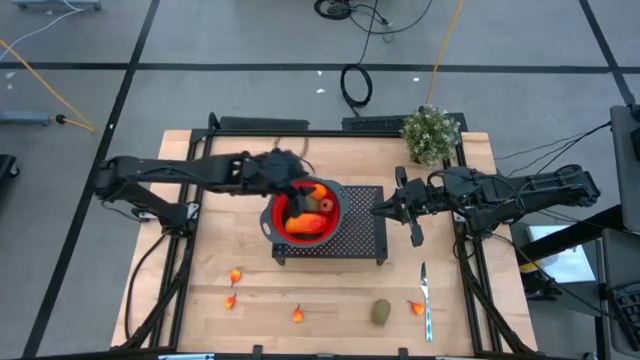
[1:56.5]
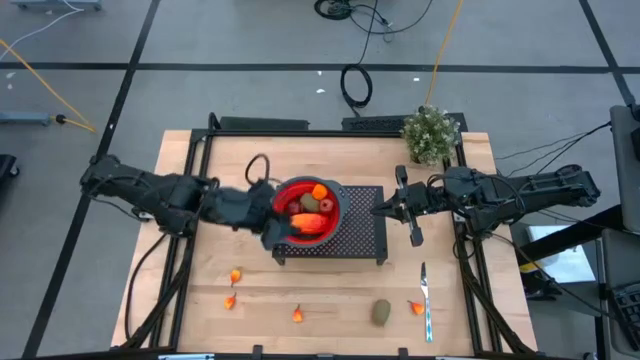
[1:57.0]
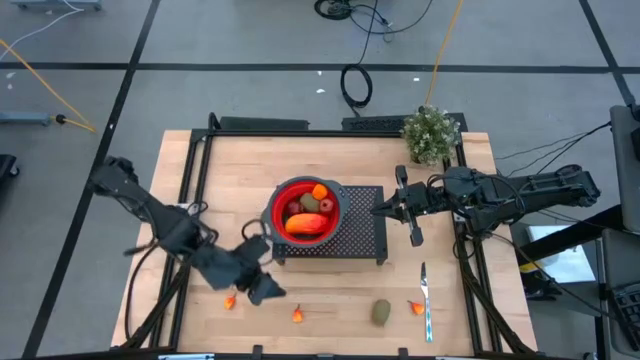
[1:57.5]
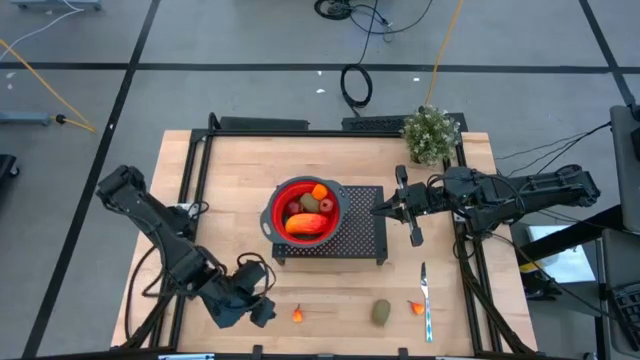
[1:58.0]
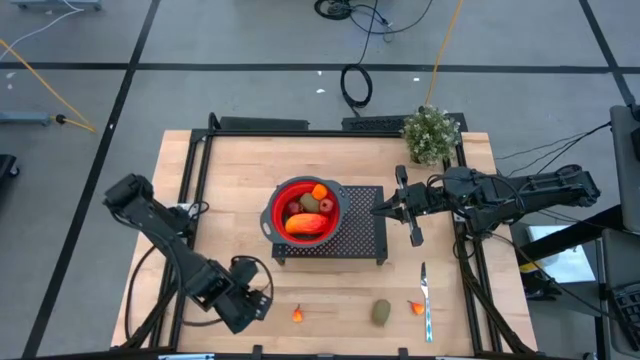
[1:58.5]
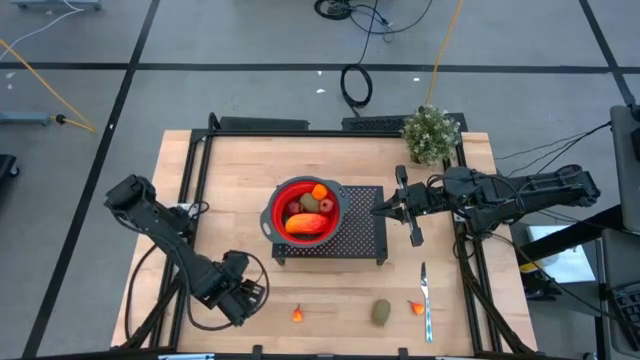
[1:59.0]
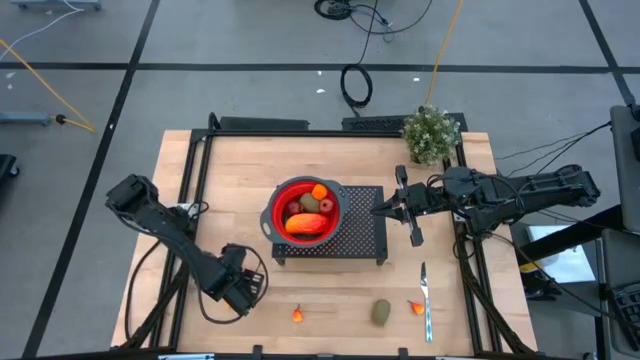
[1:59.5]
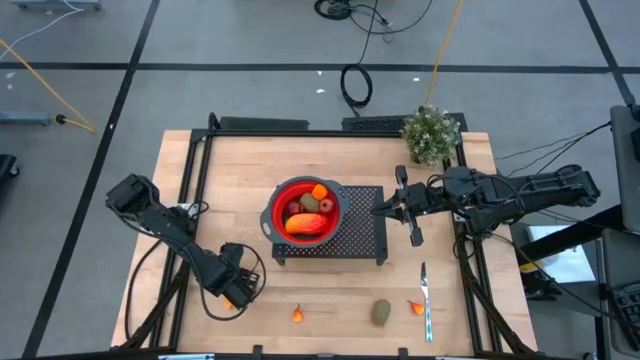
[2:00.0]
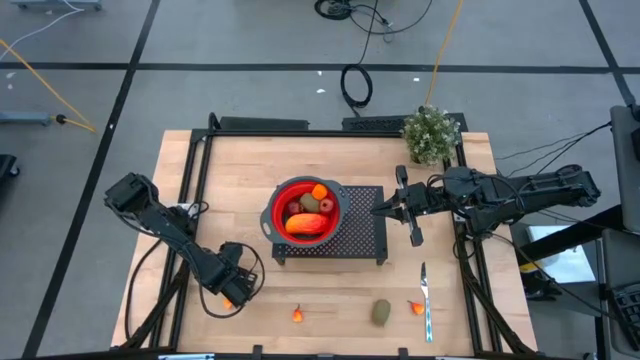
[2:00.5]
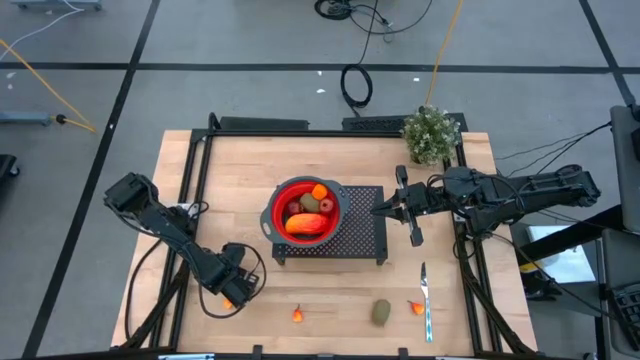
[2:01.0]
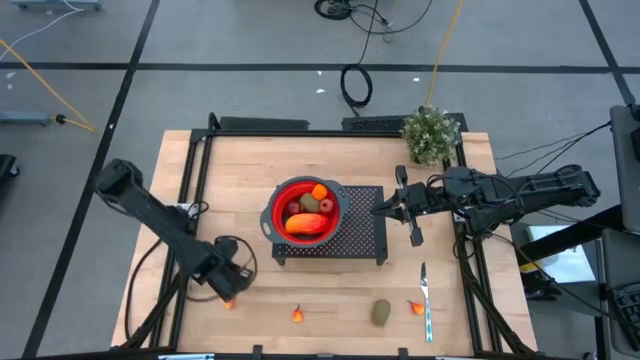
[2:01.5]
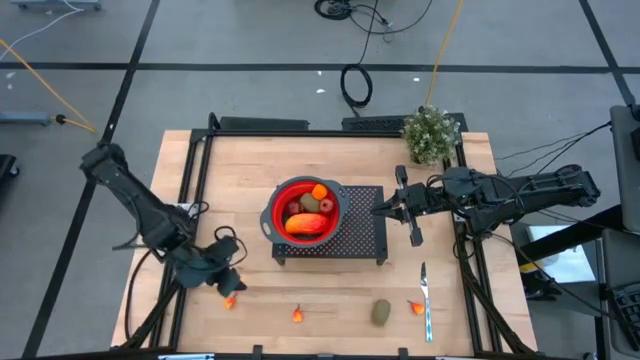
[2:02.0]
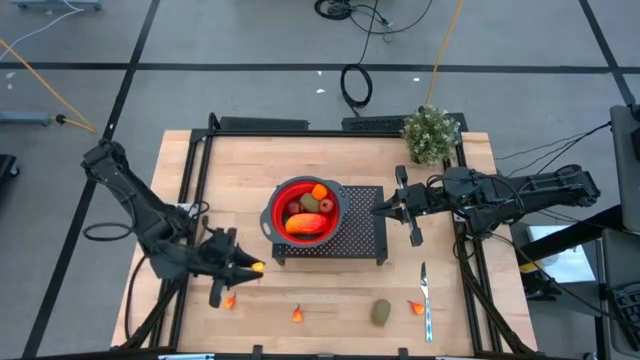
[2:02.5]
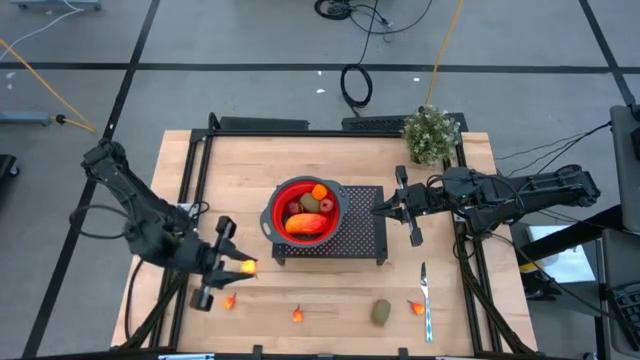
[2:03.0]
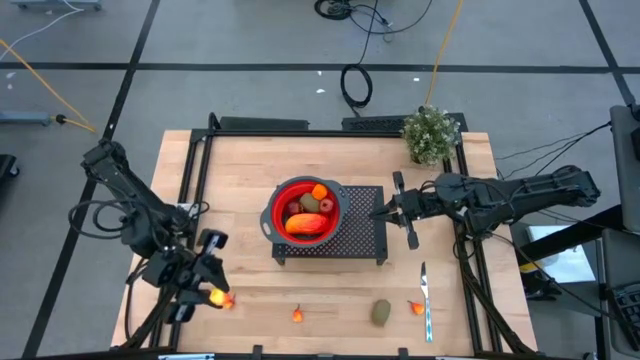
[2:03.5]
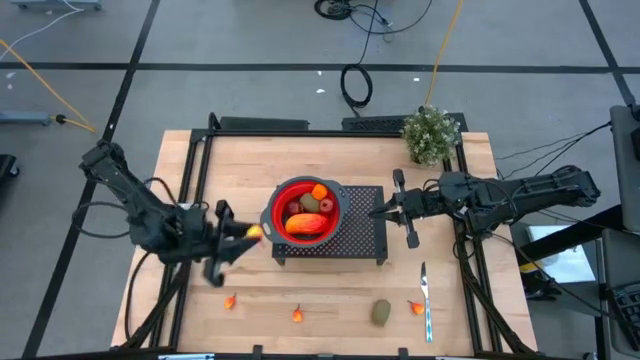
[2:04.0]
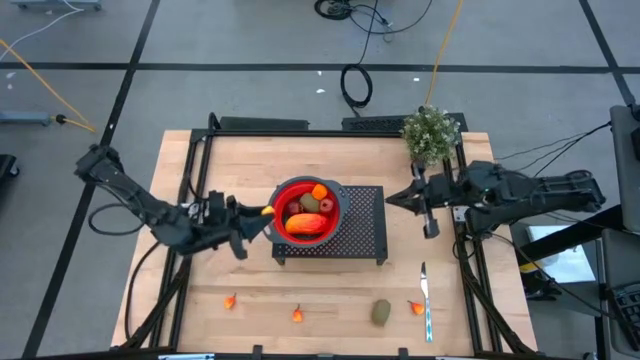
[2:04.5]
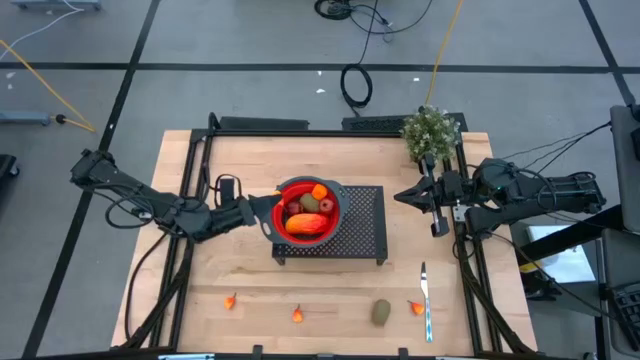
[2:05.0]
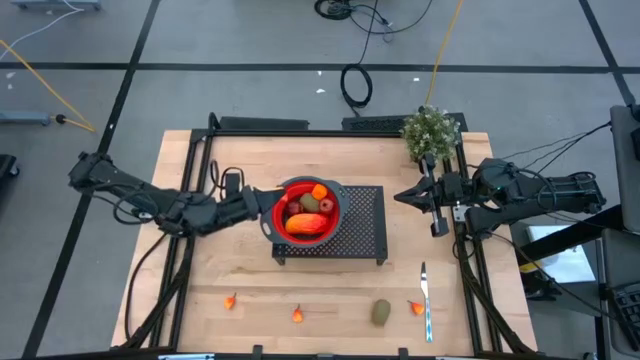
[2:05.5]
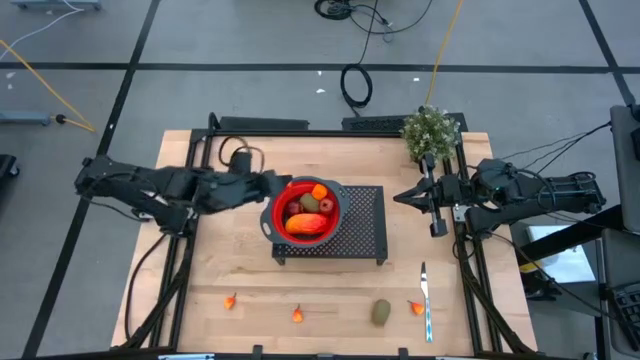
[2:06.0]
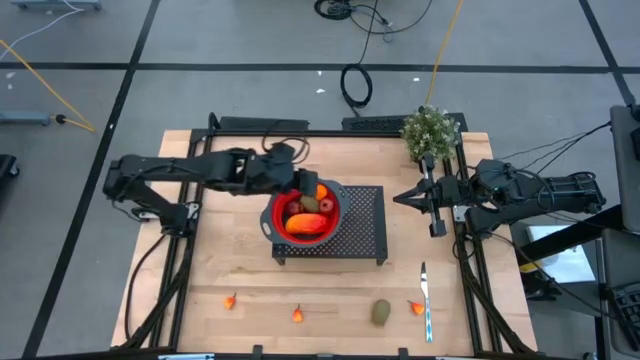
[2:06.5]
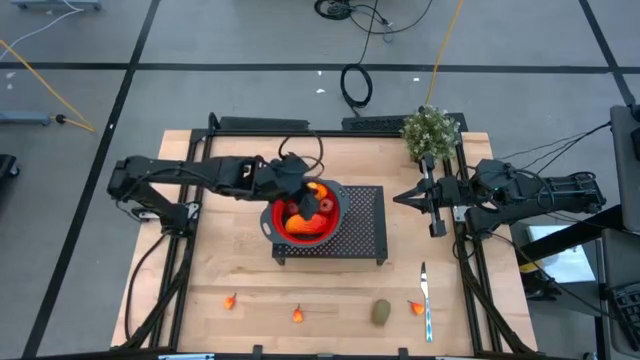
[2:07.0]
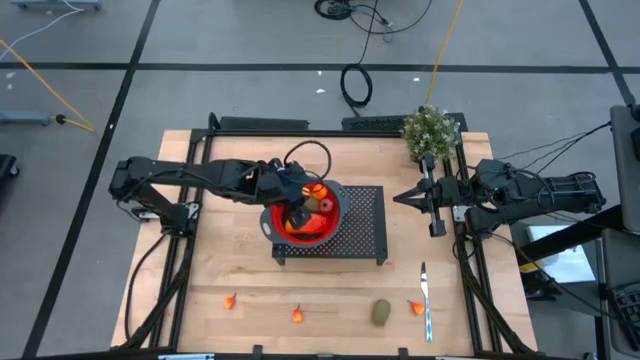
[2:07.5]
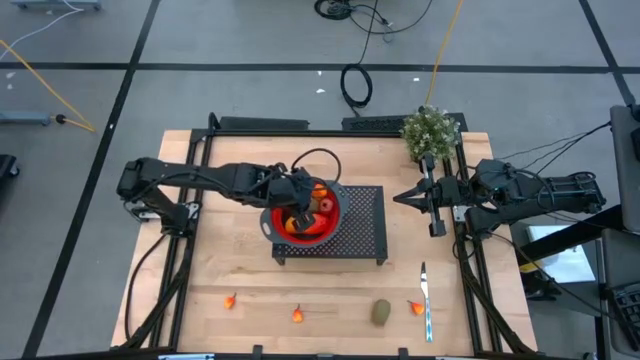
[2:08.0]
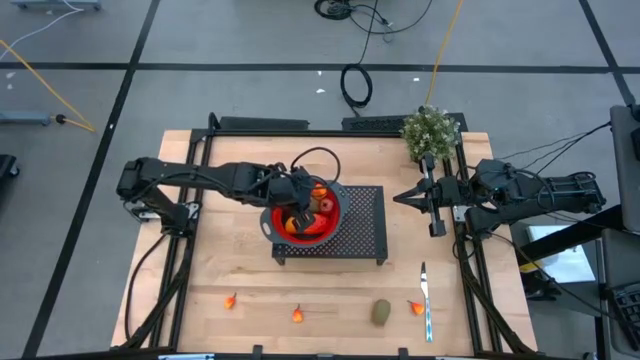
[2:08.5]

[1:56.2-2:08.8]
Task: Pick & Place Fruit
Put the orange pear into the red strainer bowl on the shelf

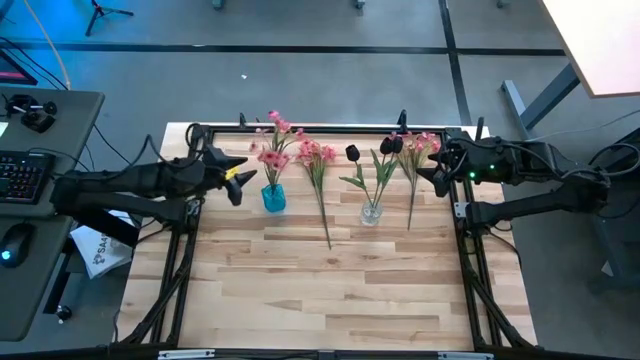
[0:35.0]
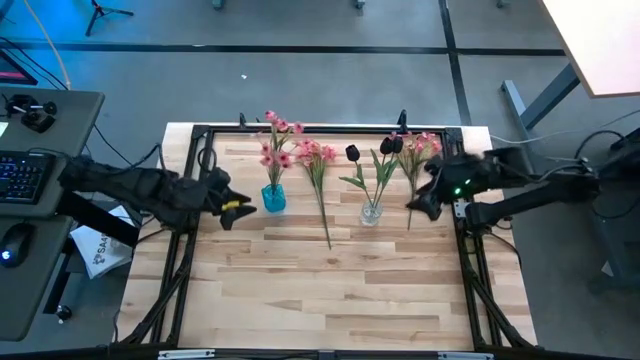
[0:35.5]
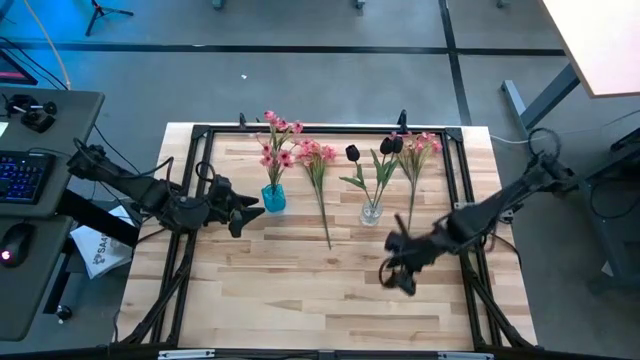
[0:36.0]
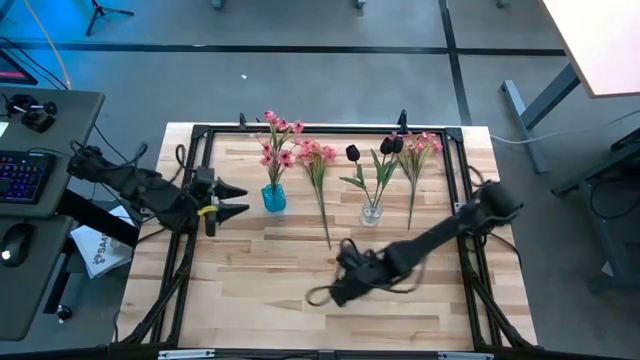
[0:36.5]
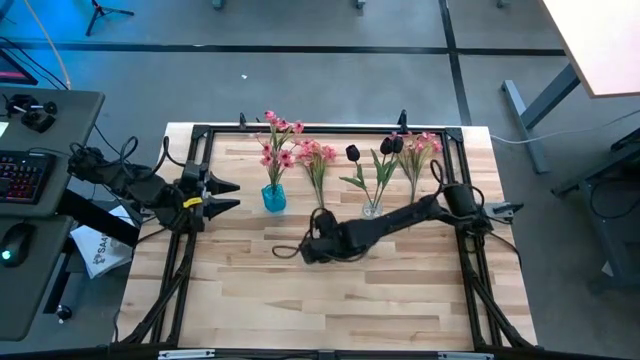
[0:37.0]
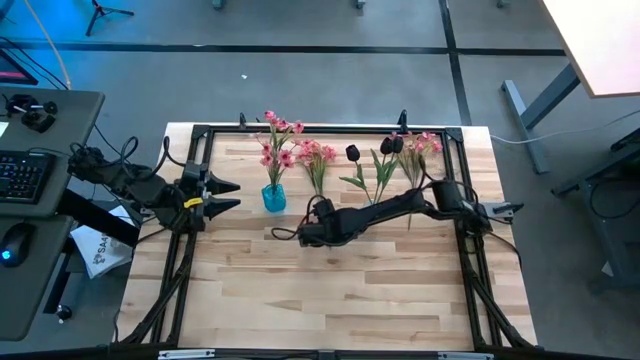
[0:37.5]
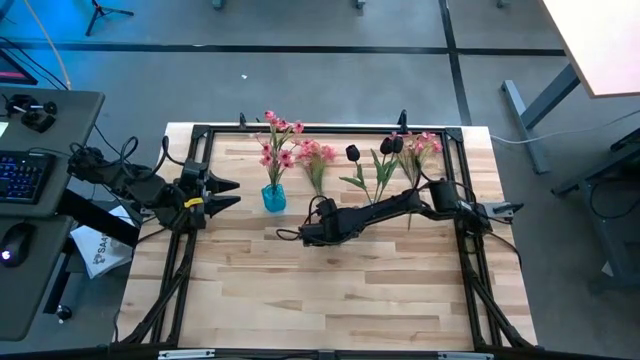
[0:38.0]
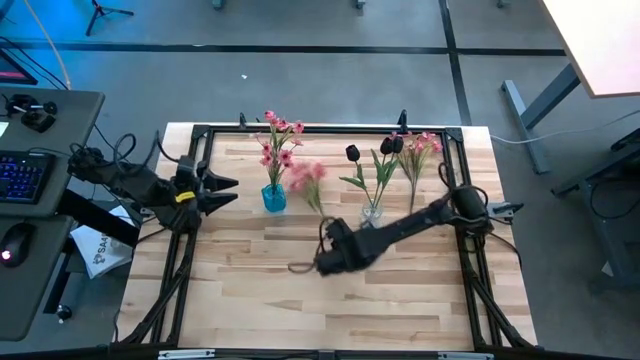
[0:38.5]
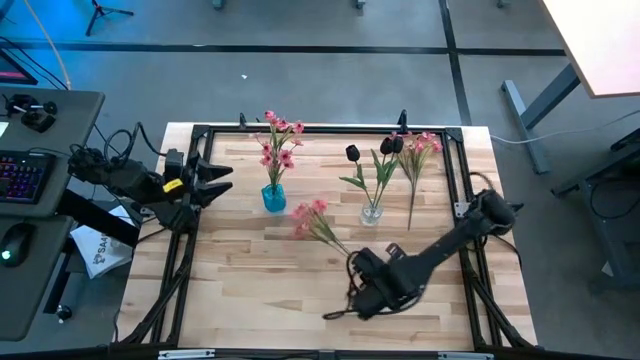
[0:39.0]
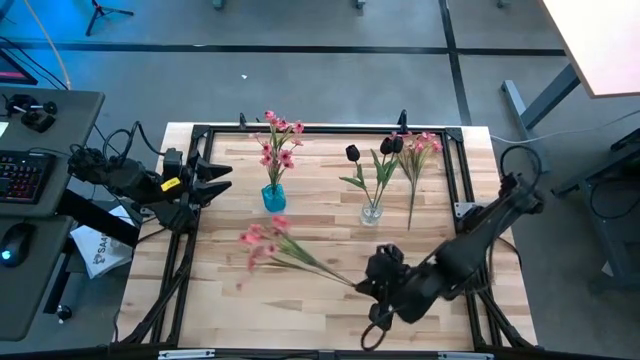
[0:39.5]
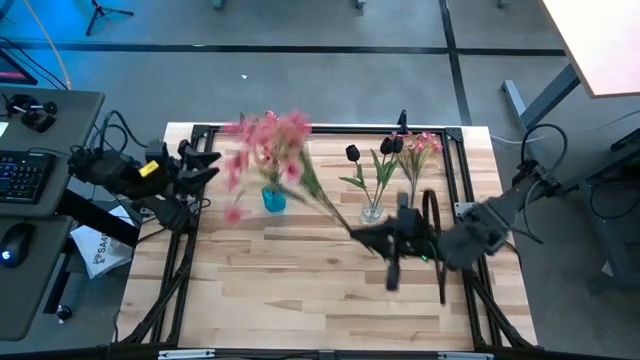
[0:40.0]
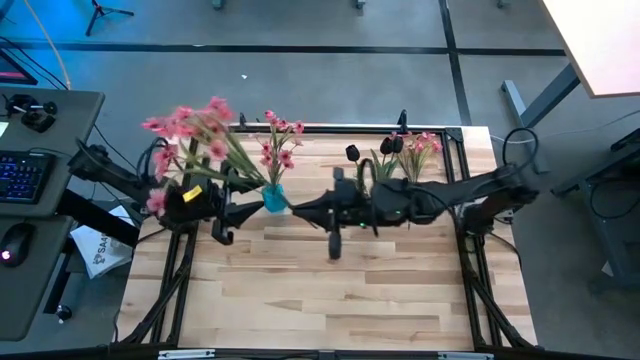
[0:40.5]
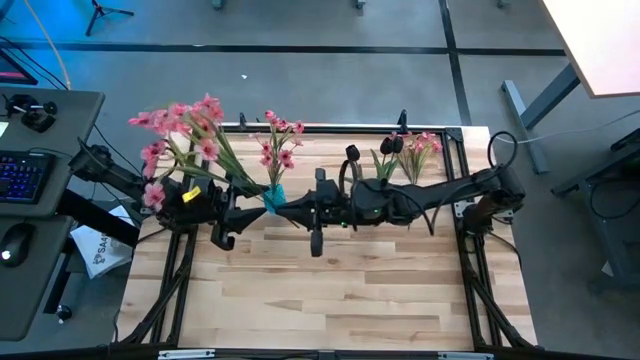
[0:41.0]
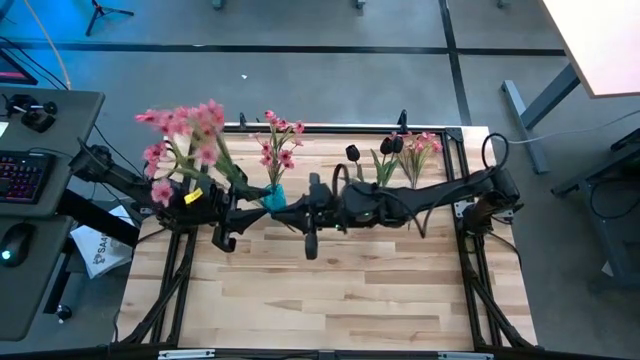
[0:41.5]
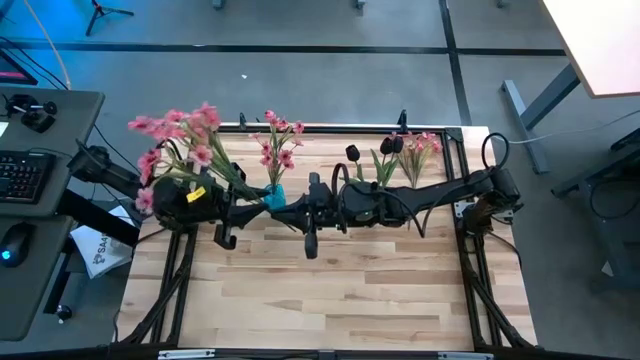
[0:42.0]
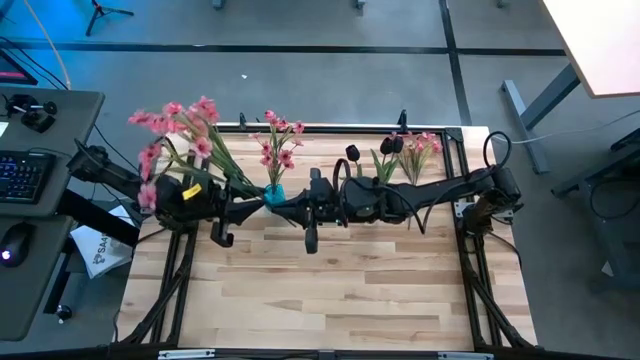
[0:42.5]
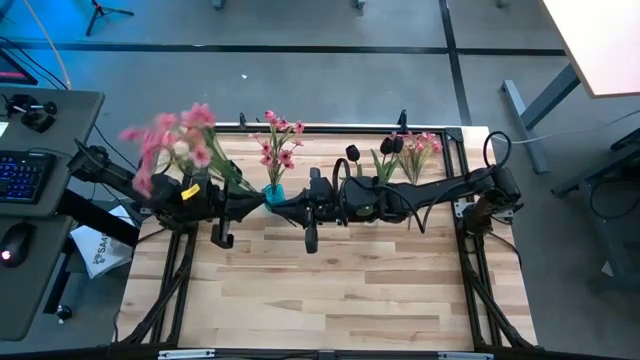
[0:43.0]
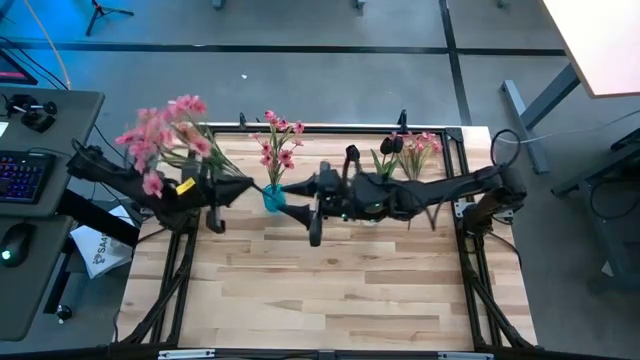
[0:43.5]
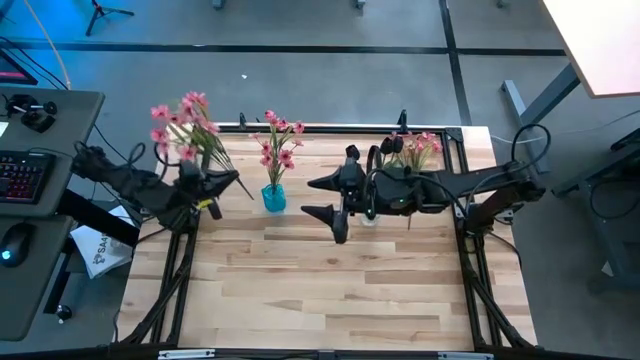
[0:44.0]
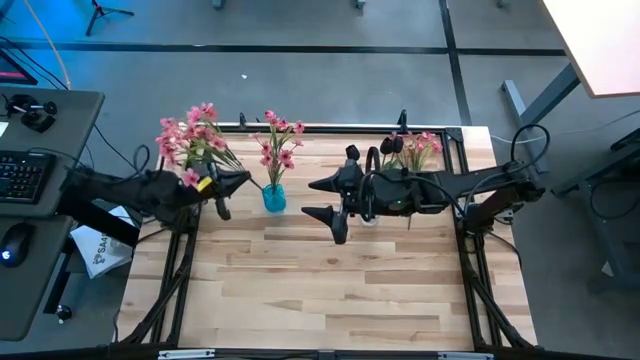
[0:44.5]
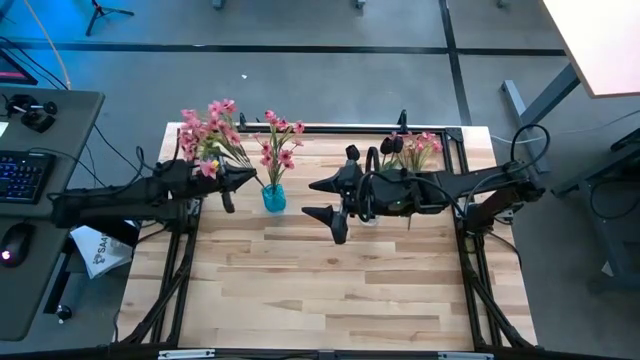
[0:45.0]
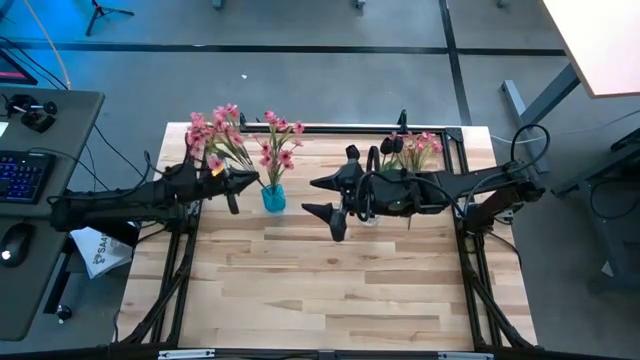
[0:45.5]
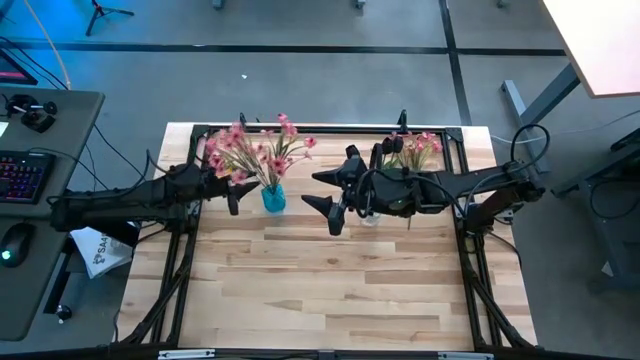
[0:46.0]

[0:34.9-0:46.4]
Task: Sort flowers into vase by color
Put the left pink flowers into the blue flower vase
